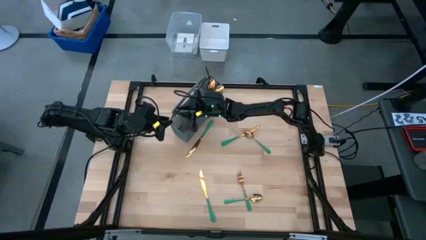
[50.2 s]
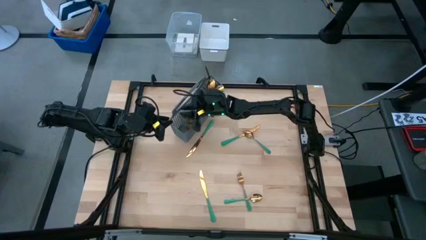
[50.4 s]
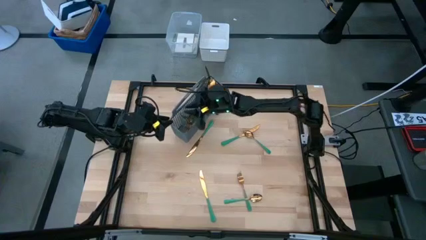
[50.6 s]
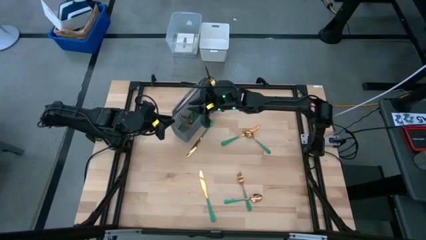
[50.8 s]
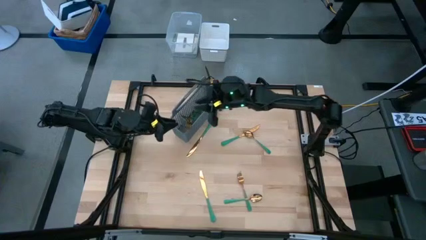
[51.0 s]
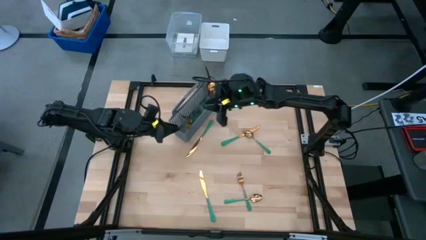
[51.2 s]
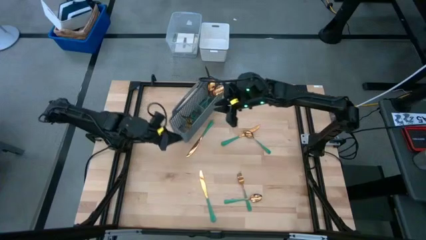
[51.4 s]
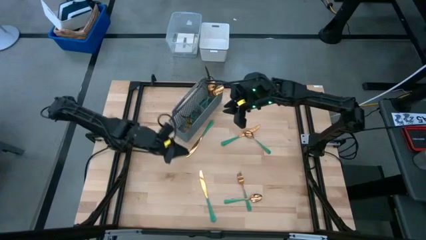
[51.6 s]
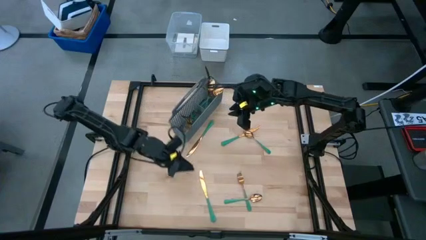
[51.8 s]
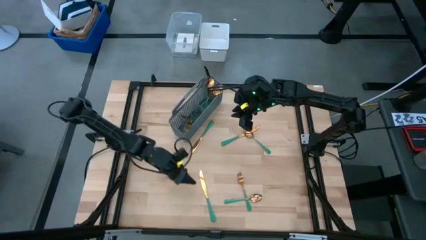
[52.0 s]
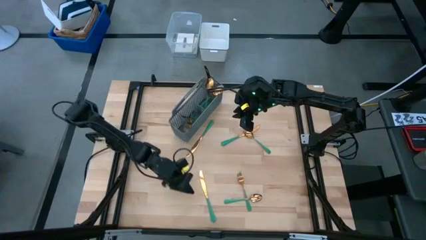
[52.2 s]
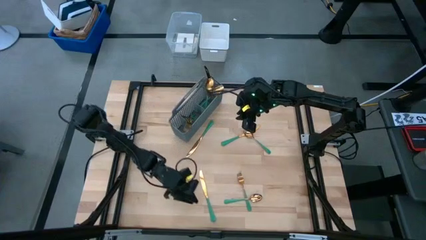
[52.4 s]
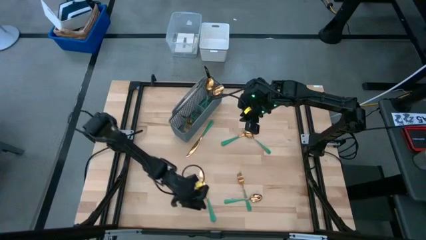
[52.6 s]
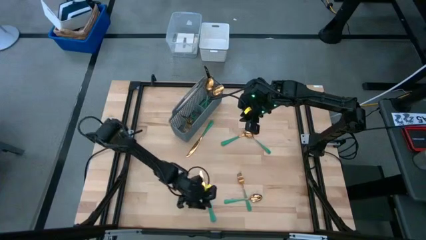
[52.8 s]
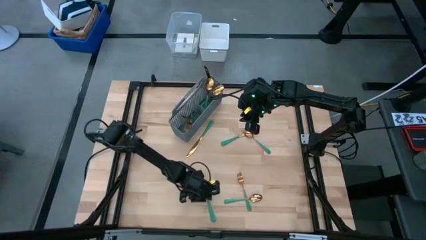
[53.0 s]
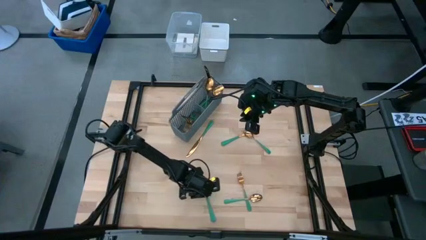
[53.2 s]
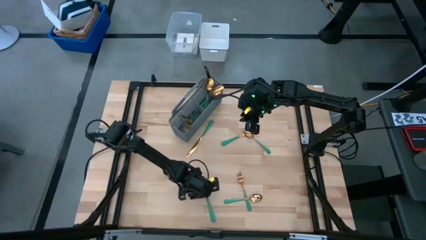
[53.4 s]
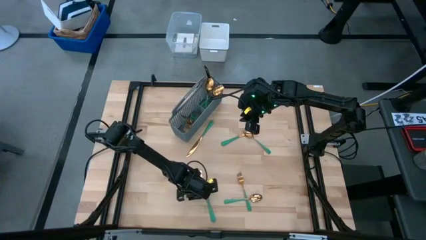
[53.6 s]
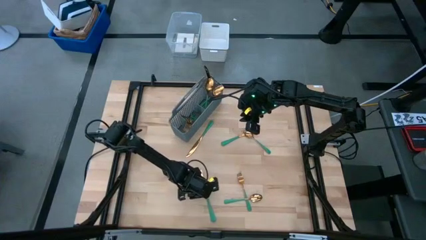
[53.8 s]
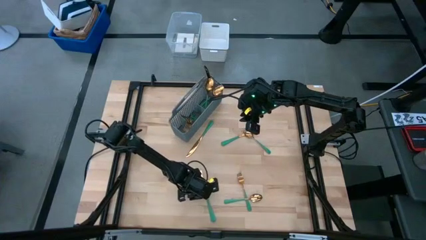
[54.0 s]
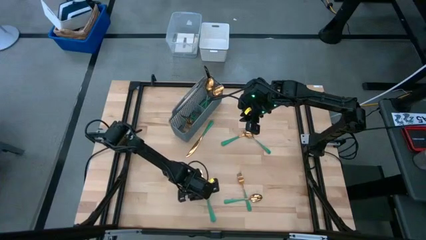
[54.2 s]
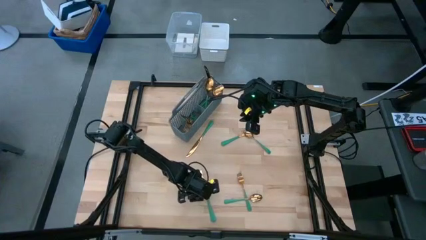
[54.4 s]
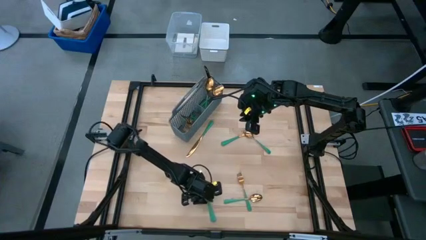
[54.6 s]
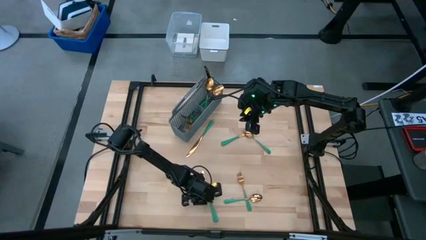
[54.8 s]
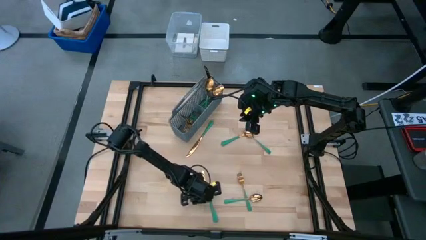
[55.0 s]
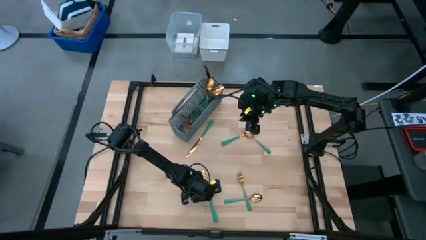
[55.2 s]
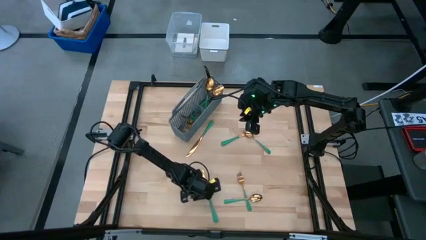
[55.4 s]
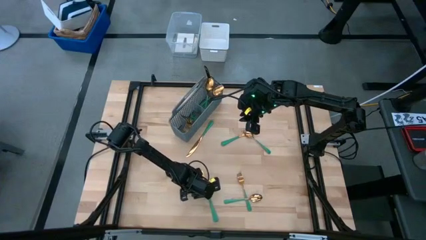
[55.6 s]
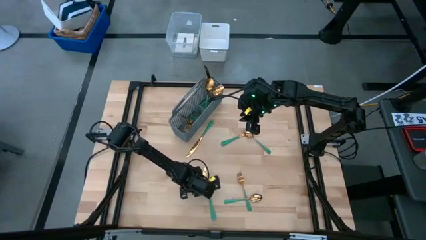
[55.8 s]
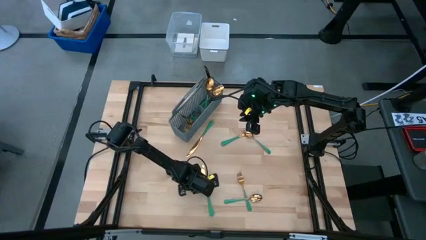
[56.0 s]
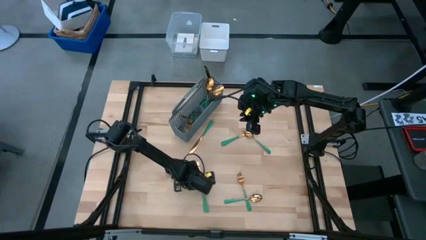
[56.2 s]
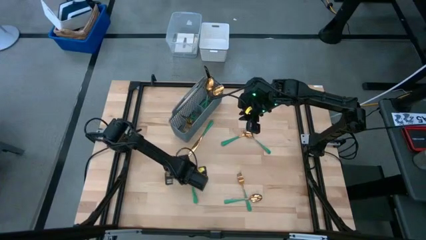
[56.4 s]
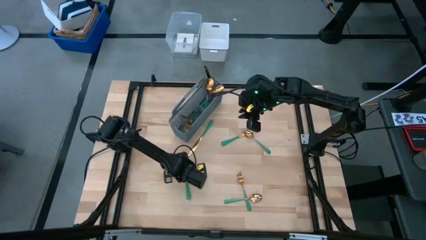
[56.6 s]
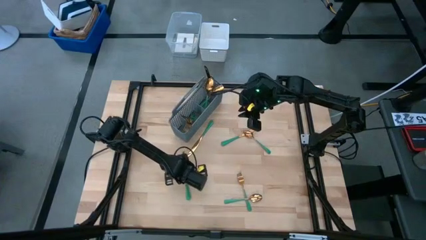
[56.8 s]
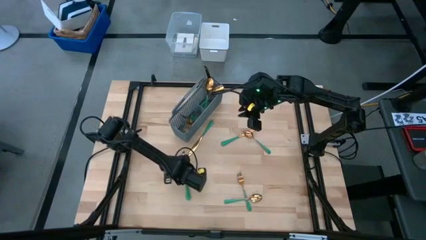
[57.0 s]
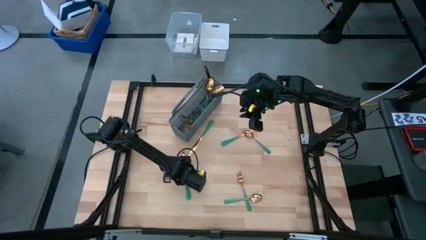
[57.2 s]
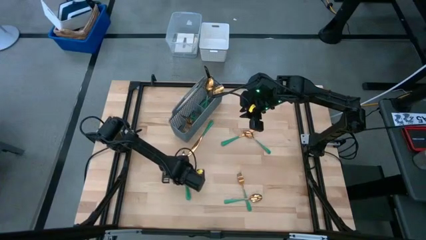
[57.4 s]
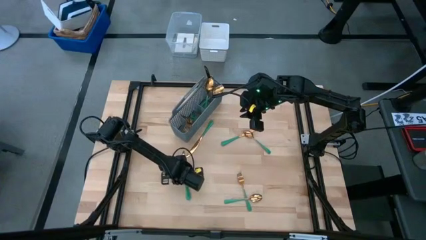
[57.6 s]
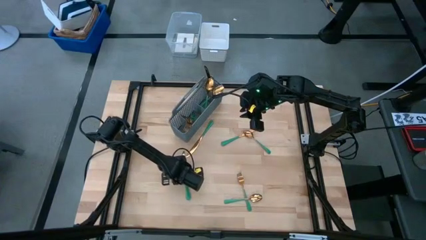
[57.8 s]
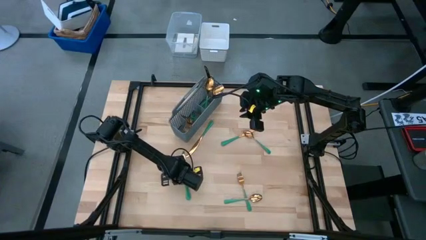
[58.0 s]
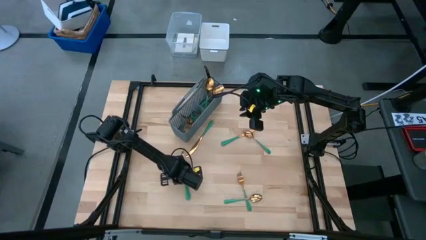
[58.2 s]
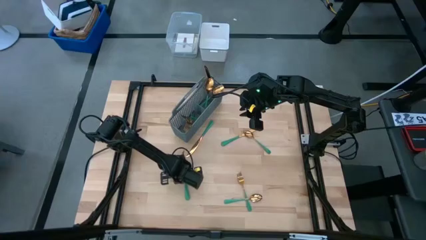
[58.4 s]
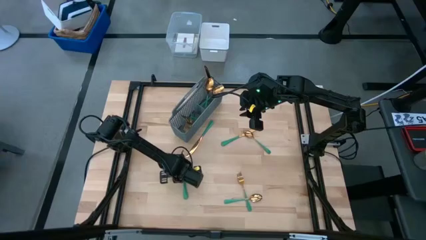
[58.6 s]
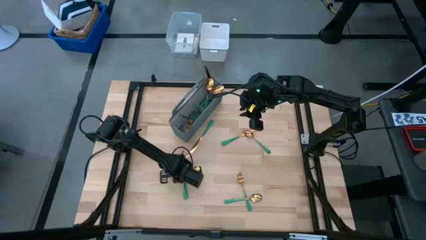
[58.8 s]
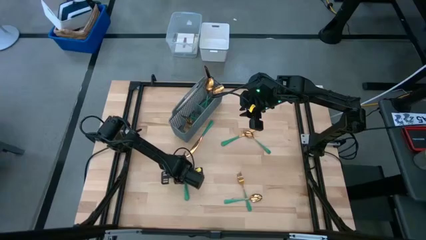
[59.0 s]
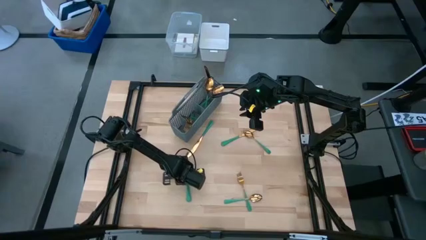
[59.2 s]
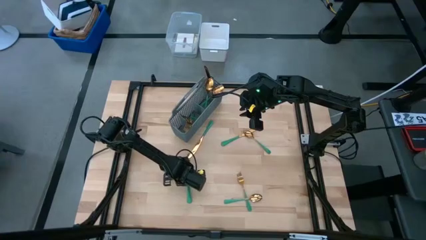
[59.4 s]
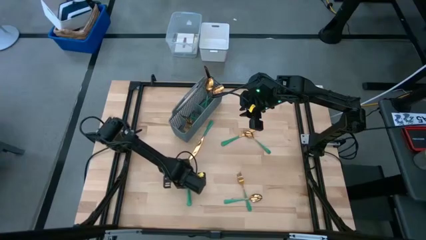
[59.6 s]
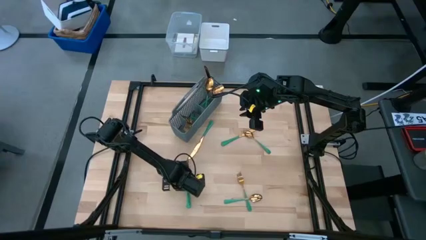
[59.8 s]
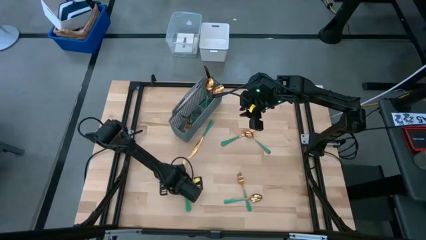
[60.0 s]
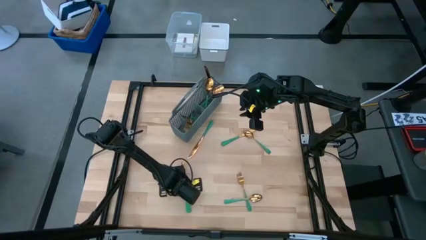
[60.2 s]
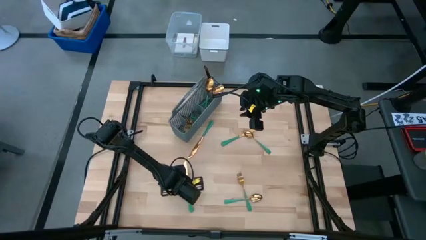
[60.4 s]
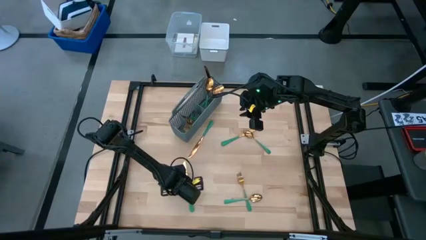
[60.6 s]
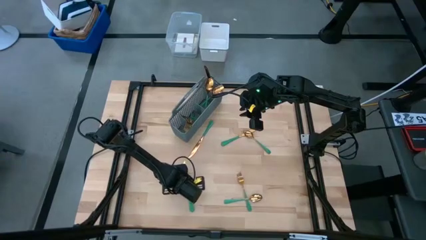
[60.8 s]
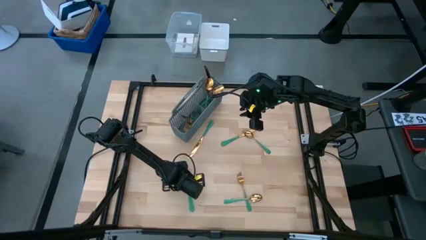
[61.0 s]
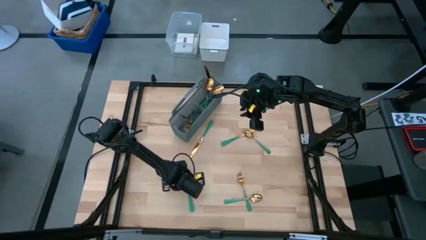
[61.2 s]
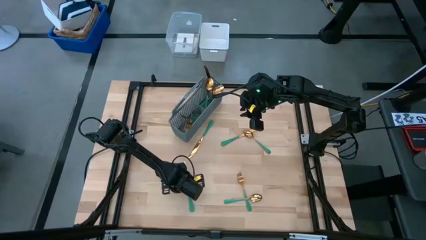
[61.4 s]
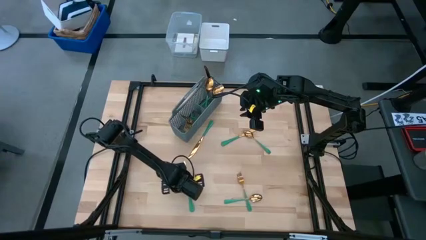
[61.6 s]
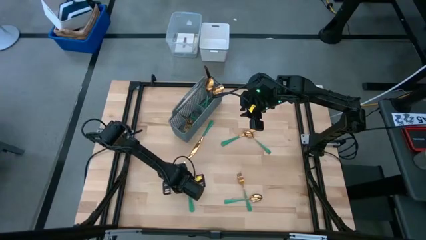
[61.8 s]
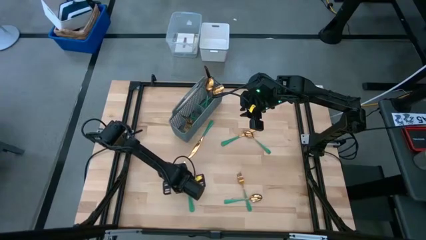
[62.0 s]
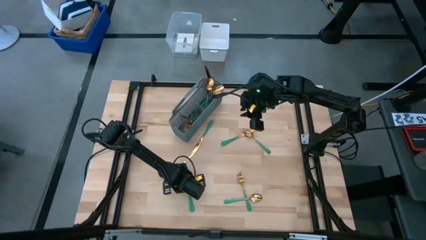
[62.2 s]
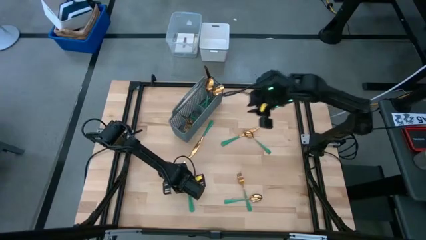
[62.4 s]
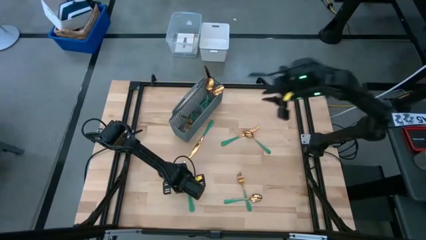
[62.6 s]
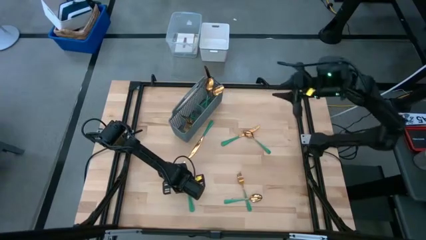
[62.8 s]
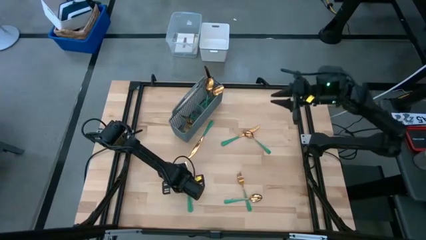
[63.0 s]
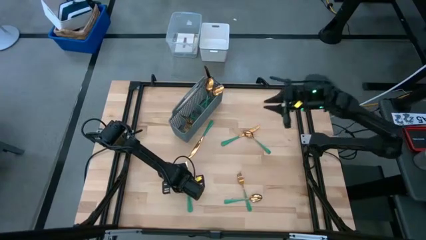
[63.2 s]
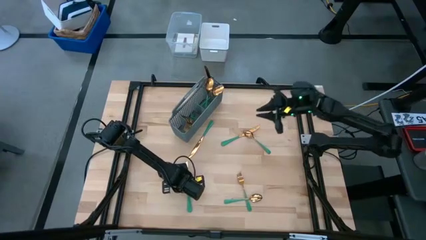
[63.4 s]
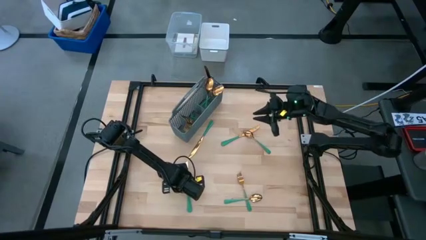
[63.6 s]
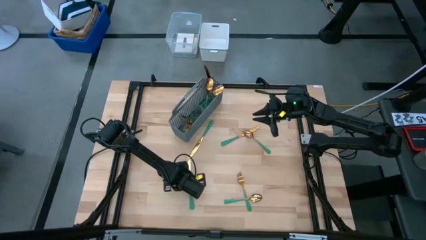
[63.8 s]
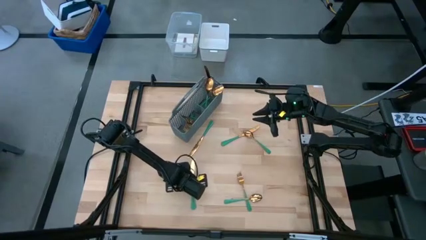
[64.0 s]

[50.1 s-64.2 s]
Task: Sort silverware
Put the bottom green-gold table knife into the silverware basket
